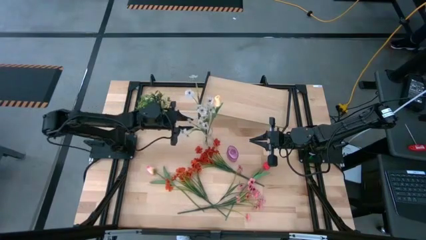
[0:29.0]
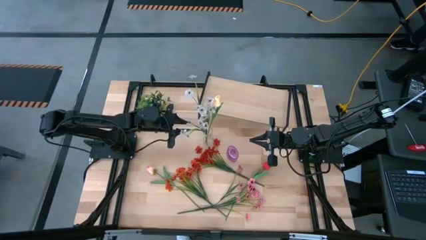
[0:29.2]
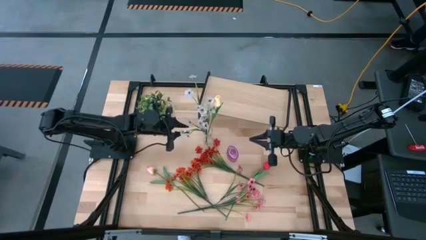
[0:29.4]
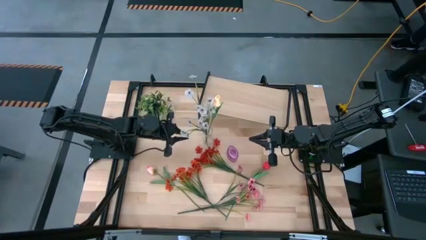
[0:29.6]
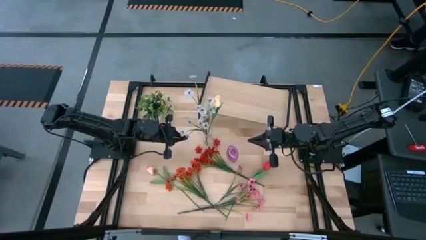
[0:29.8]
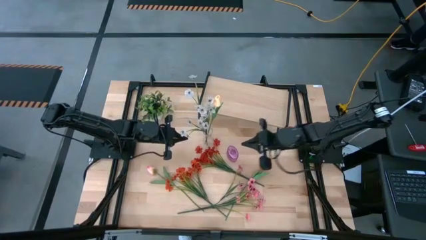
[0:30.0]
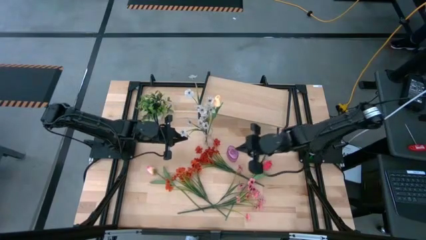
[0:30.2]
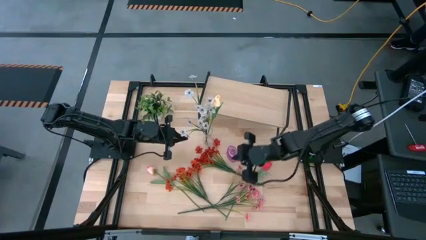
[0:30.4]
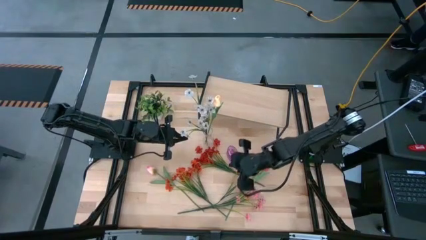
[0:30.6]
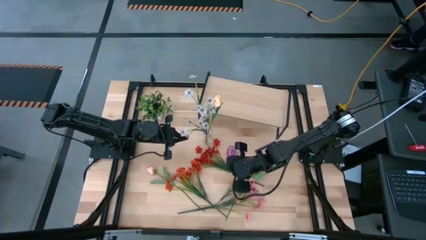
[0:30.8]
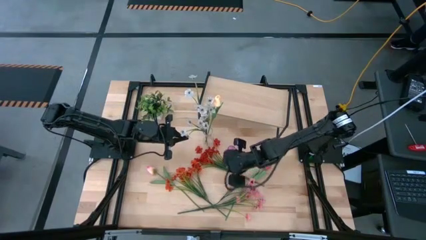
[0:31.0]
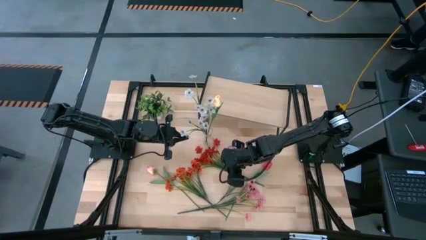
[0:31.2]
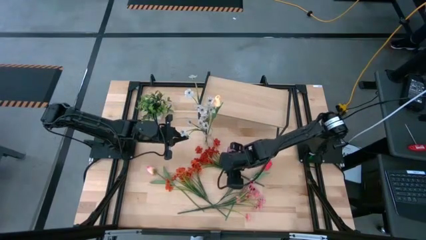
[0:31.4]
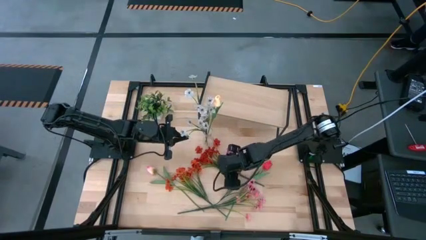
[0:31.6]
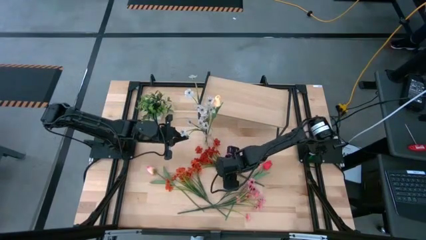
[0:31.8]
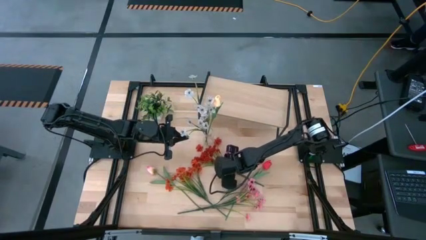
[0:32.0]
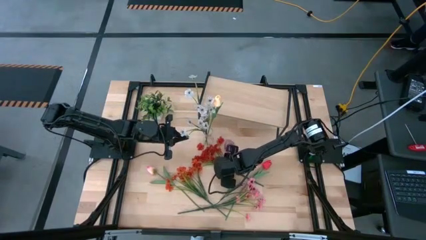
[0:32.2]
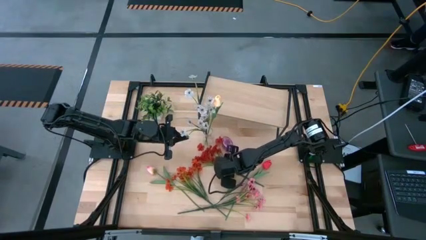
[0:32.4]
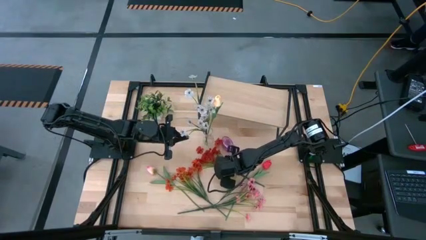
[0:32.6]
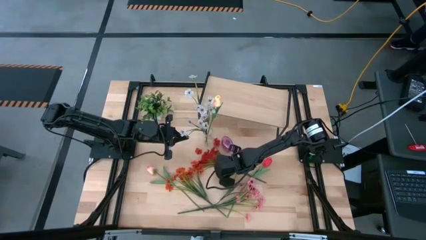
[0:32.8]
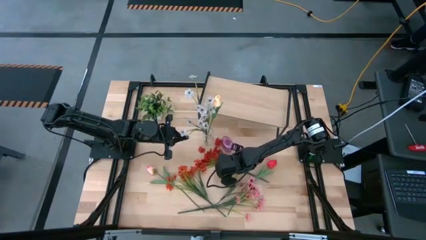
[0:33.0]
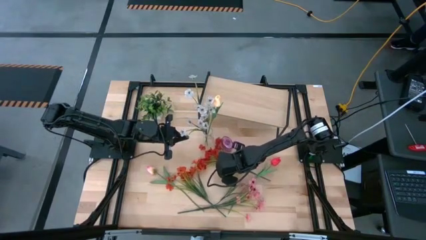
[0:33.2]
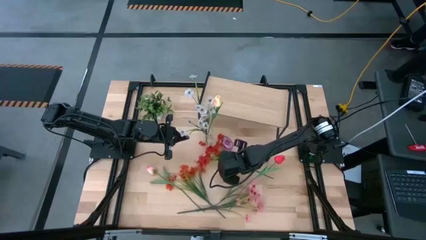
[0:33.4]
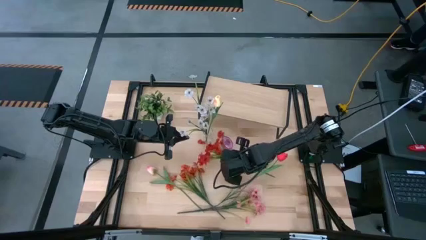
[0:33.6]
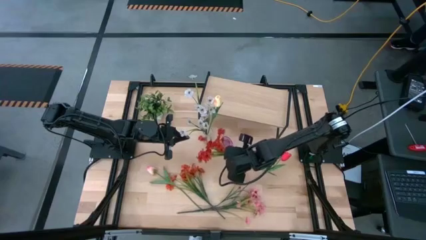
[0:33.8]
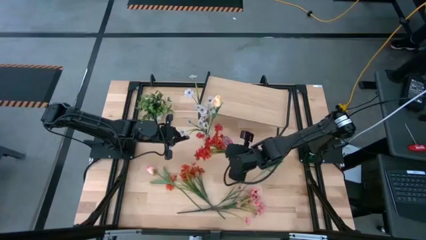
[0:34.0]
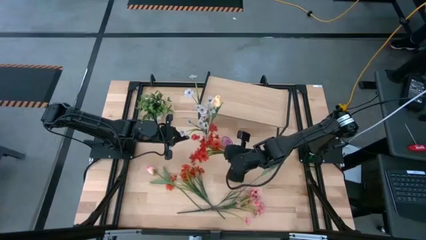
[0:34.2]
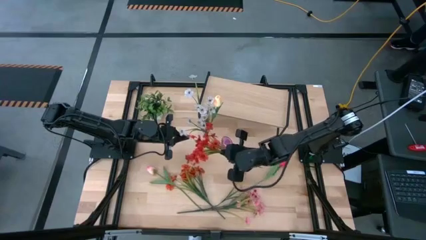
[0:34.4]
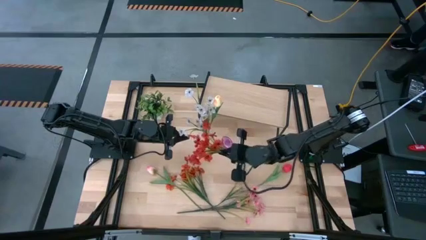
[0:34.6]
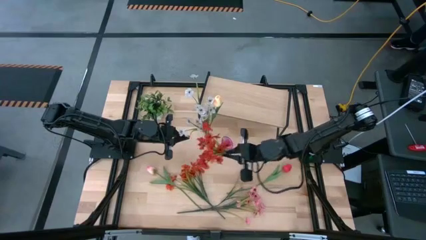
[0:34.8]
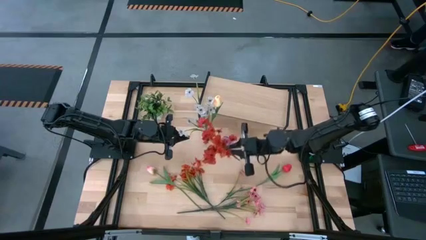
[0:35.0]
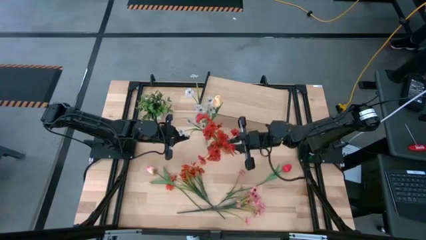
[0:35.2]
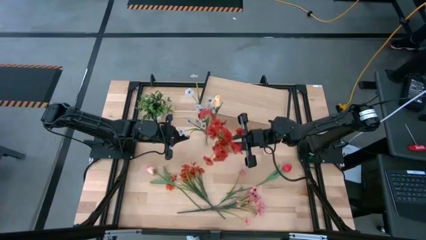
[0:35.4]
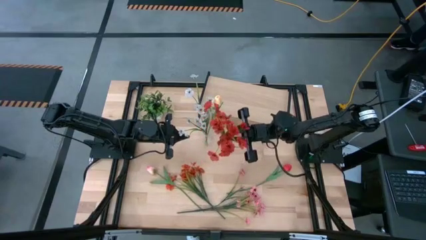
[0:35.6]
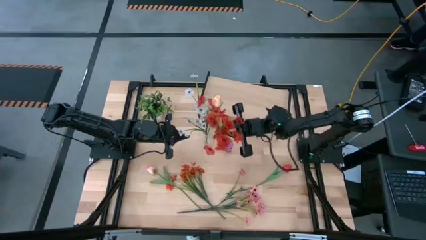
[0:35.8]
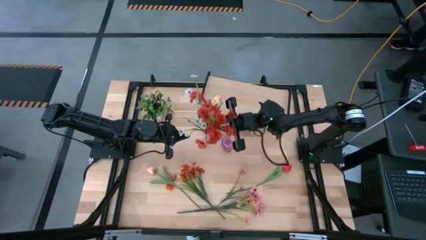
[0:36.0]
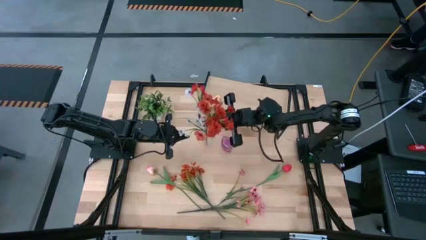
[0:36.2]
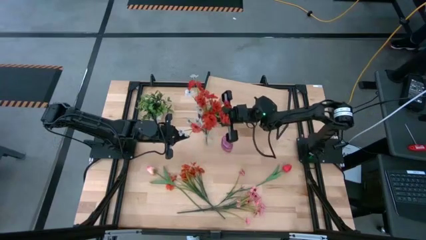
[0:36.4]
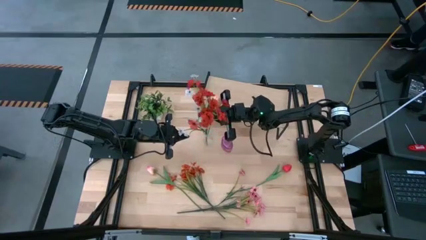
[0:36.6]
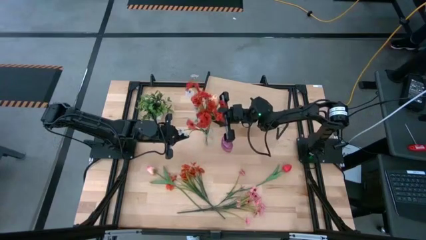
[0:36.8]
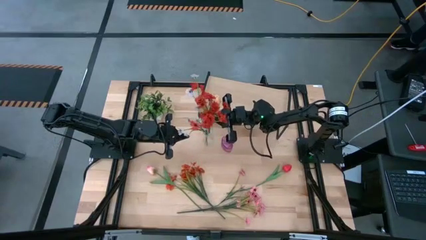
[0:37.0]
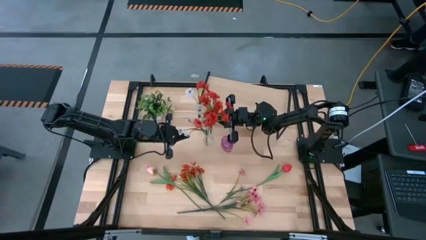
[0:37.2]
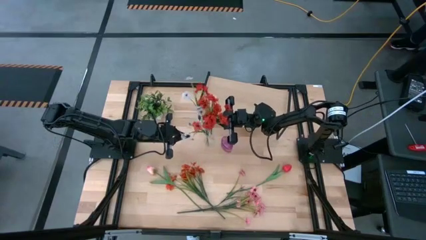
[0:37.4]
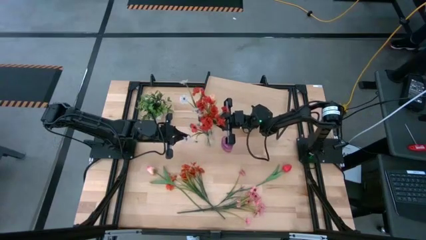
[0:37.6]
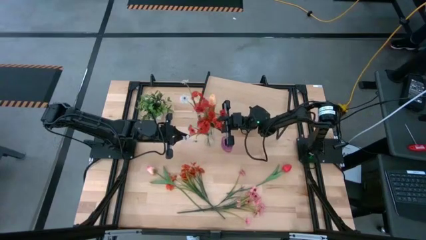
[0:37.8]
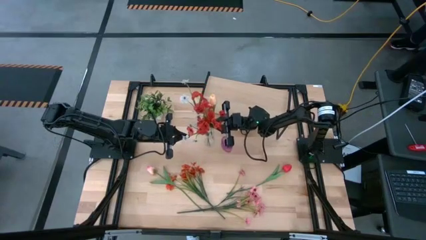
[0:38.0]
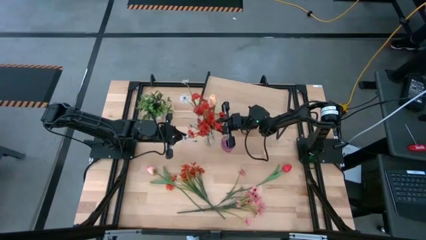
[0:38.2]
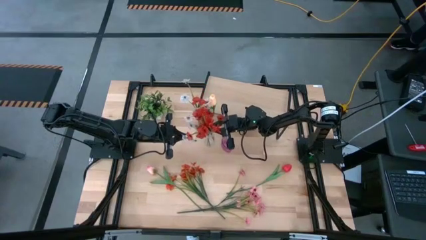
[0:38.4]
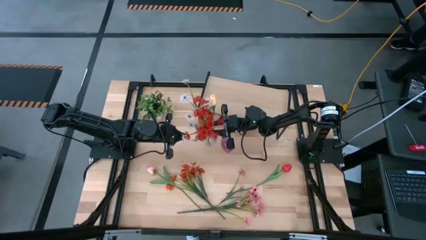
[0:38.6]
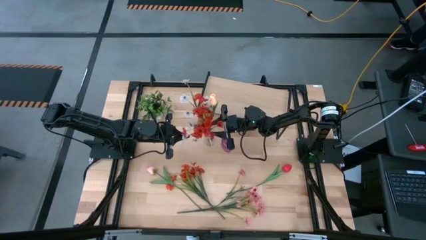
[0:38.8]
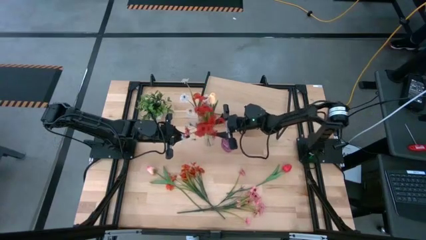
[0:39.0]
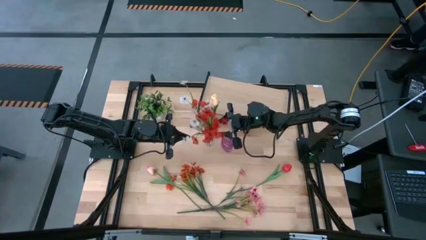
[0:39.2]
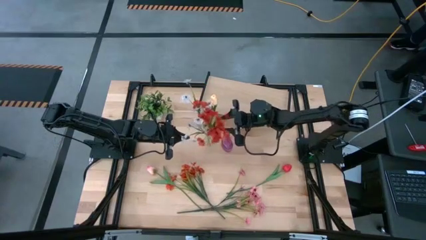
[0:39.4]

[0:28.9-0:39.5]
Task: Pick and place flowers into a vace then onto a shelf
Put the red flowers into the transparent vase

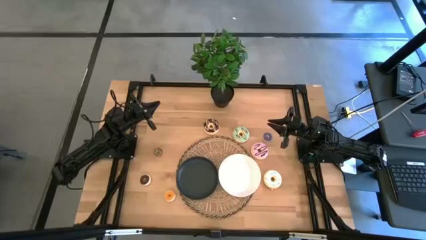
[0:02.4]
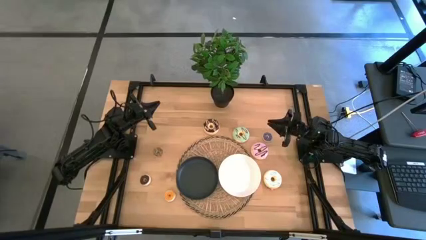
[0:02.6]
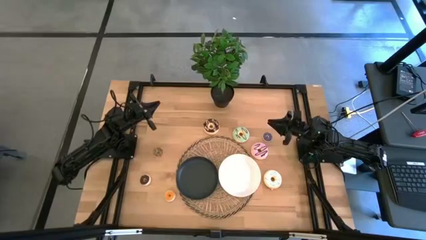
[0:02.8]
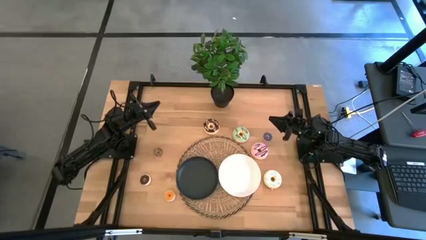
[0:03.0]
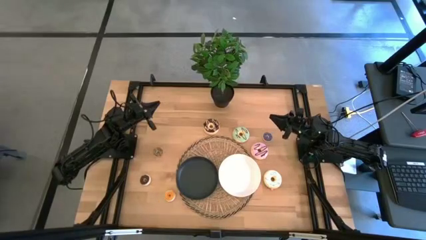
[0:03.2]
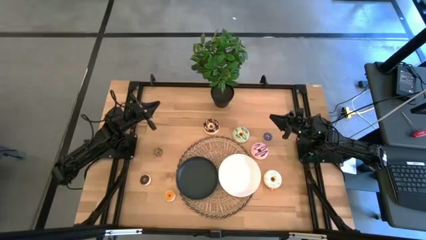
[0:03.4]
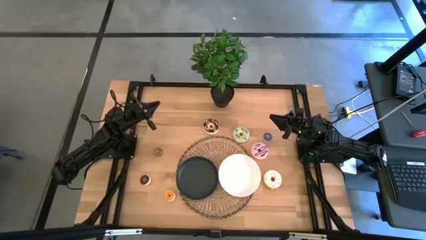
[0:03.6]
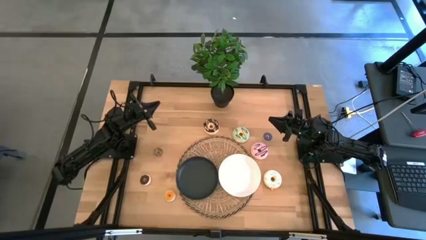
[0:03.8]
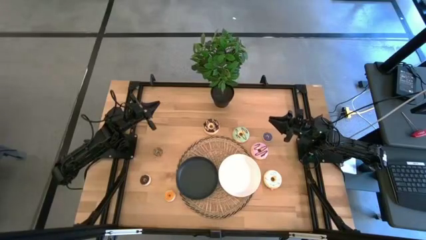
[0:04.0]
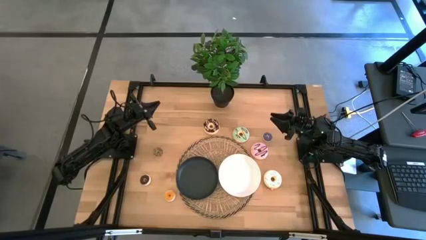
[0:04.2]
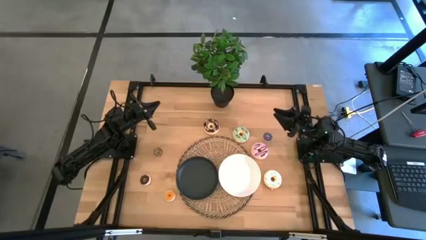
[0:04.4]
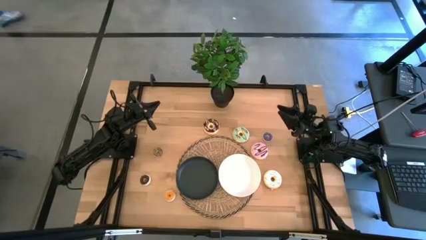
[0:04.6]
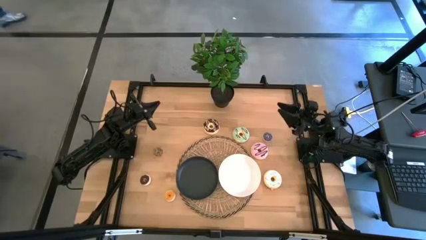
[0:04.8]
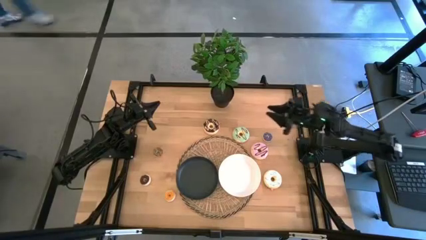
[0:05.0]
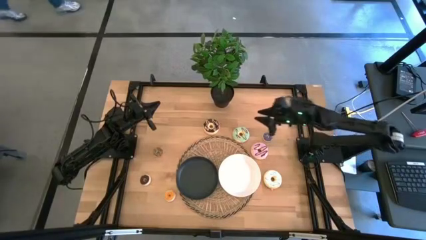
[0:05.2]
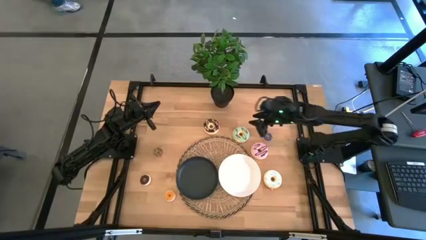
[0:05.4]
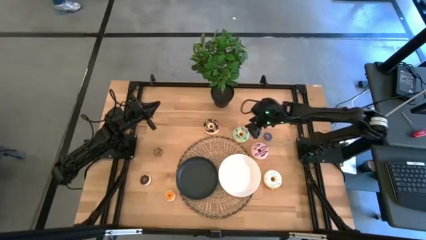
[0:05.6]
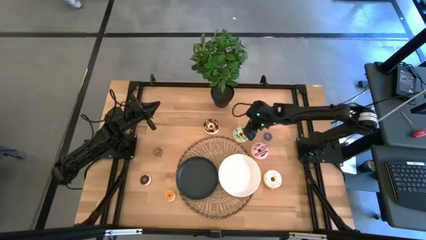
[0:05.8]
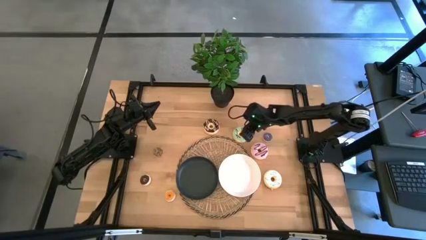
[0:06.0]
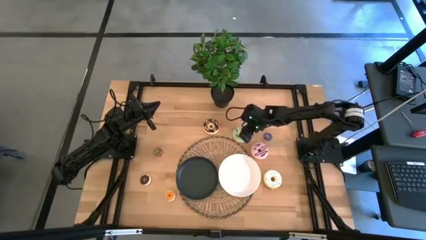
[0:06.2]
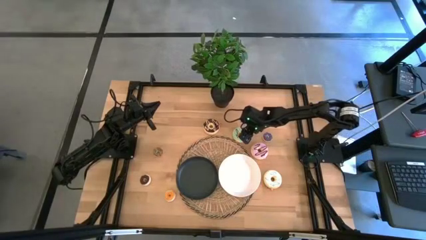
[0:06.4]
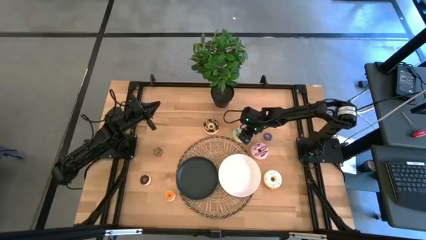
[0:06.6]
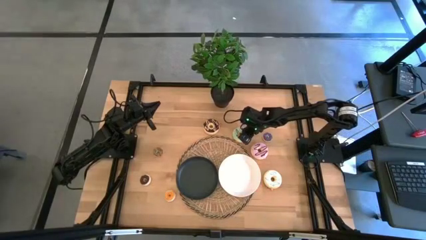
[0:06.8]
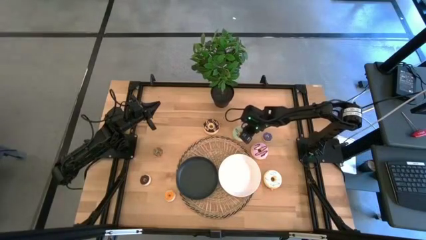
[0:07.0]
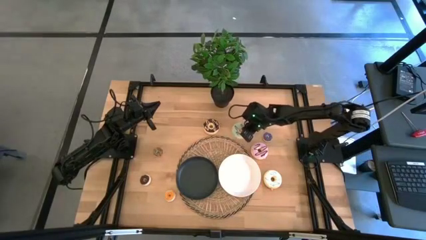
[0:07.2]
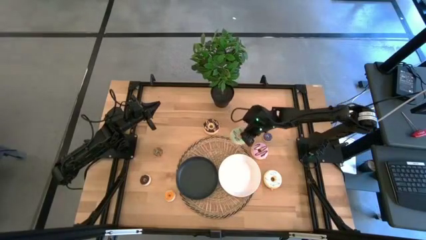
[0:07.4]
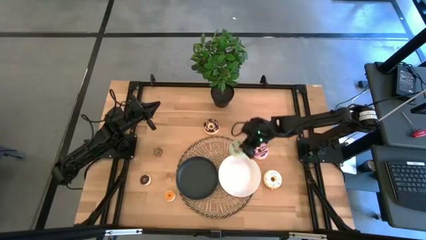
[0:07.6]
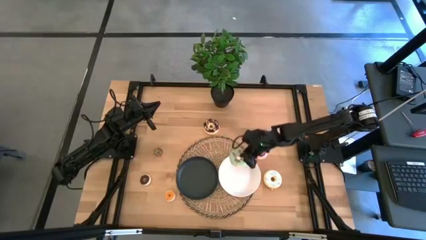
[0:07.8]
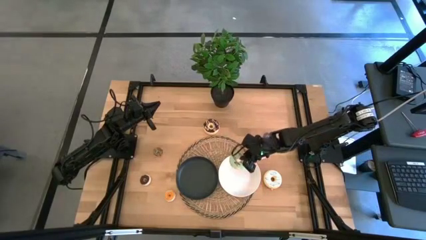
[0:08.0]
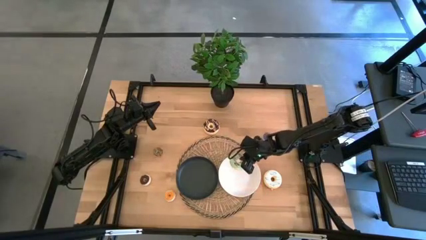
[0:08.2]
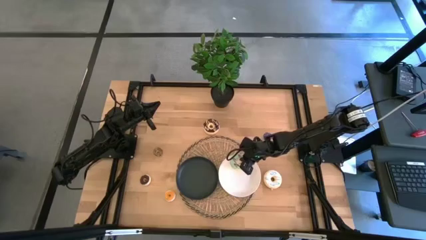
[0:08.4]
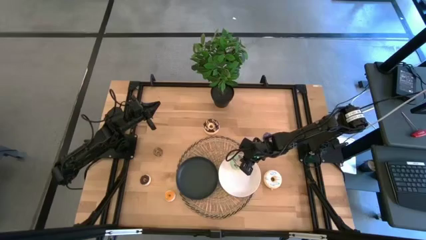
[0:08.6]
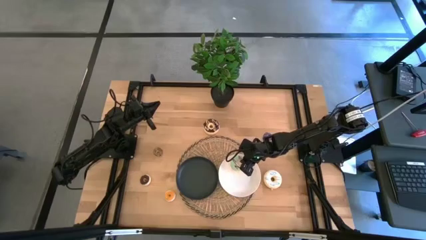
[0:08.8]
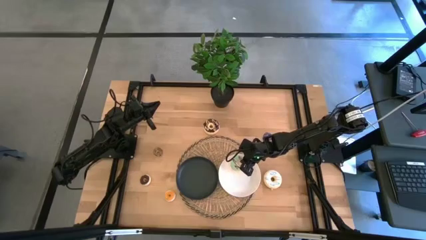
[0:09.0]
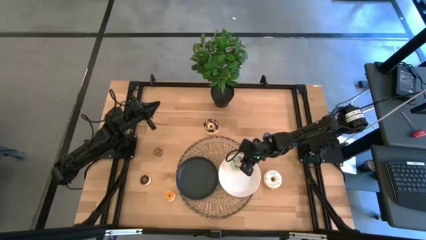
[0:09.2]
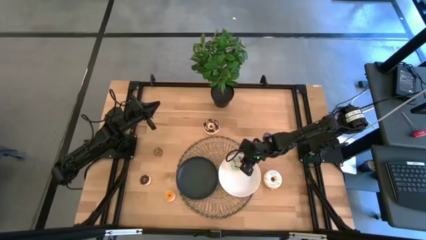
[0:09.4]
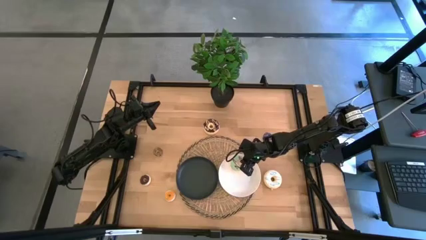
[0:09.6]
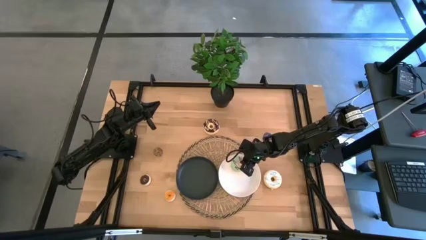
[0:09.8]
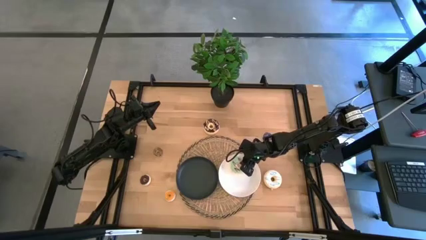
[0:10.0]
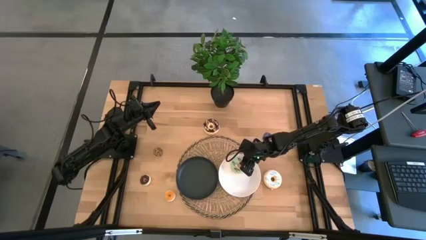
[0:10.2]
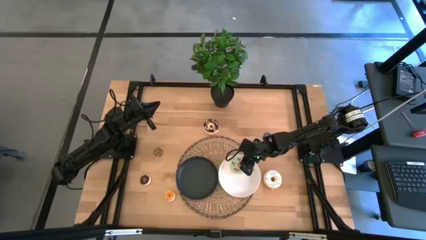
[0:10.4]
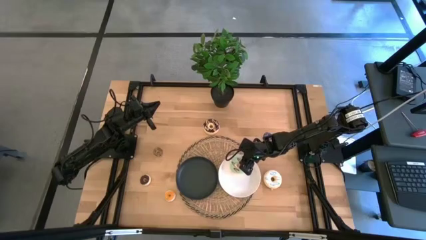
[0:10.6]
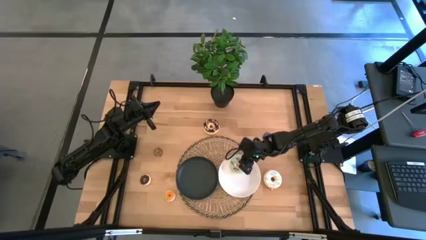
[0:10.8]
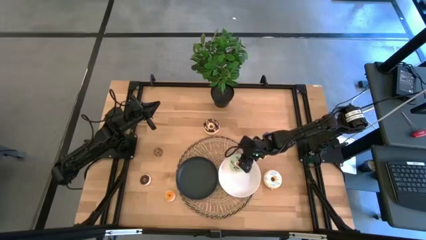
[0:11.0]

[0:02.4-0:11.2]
Task: Pick & Place donuts
Put the large blue donut on the white plate
